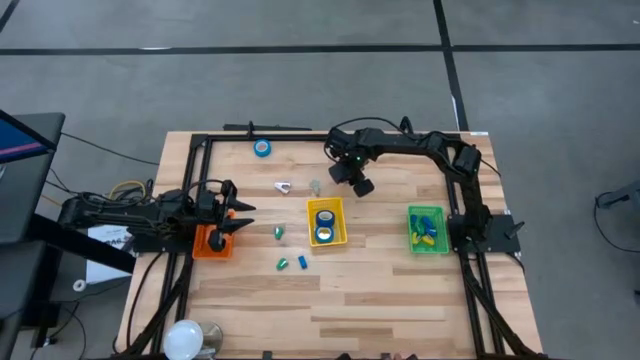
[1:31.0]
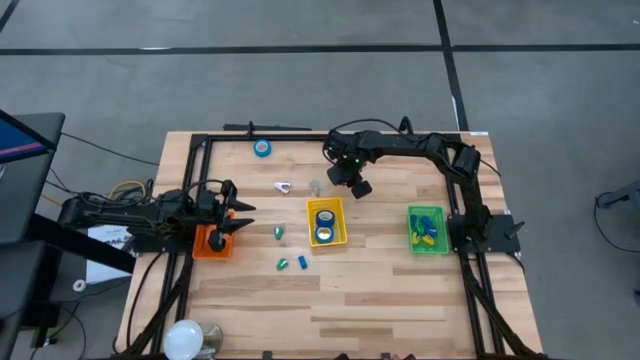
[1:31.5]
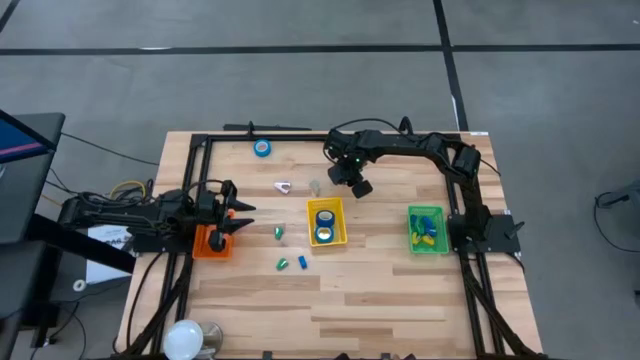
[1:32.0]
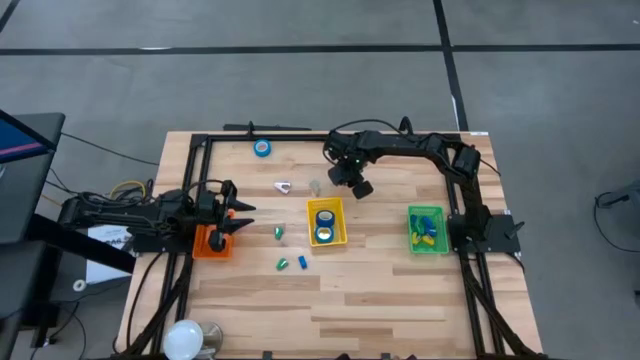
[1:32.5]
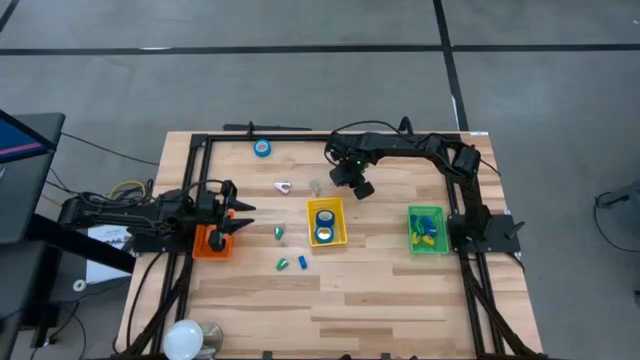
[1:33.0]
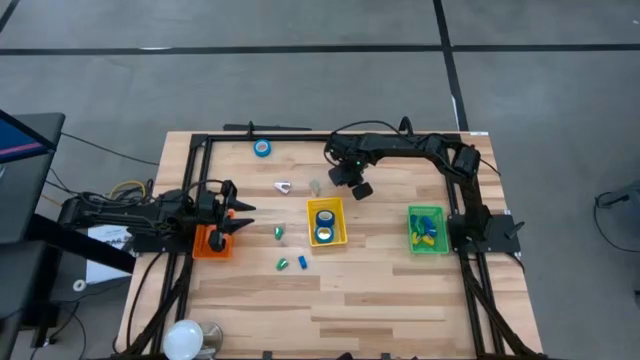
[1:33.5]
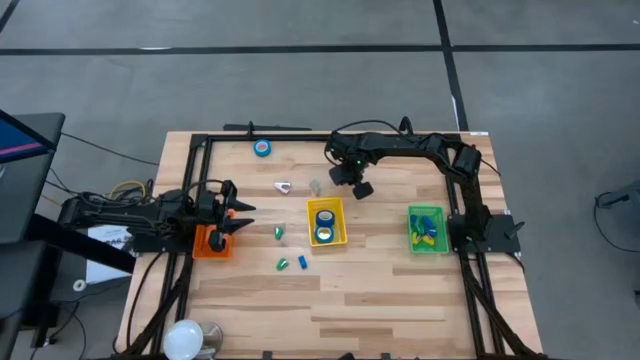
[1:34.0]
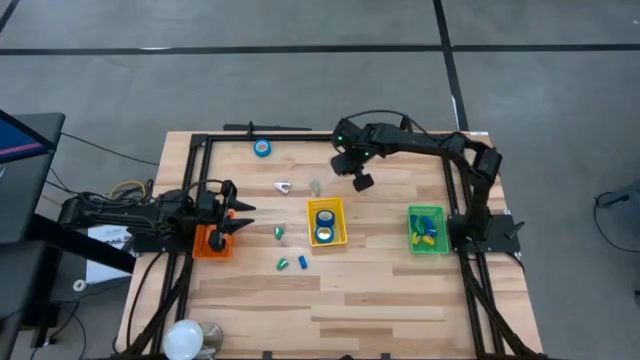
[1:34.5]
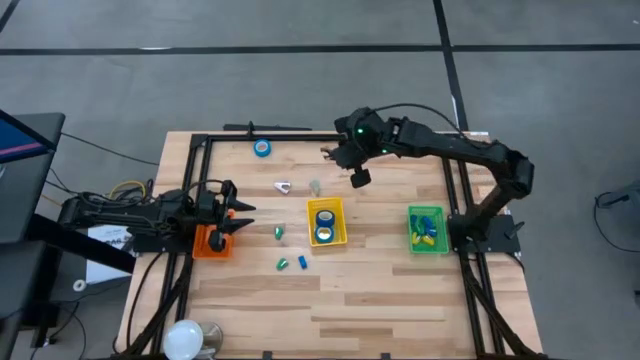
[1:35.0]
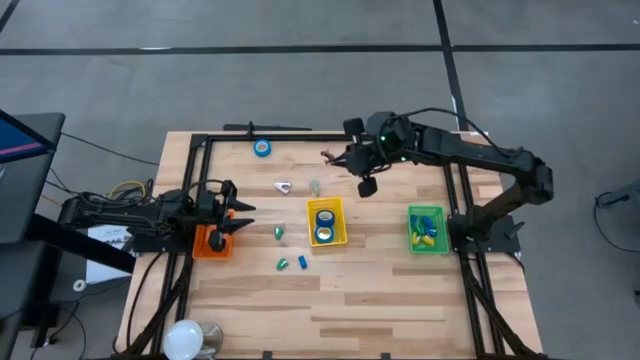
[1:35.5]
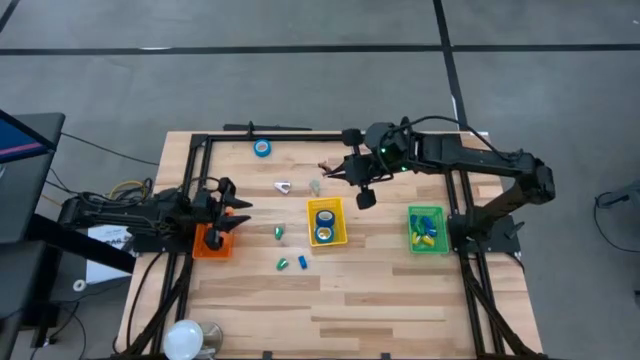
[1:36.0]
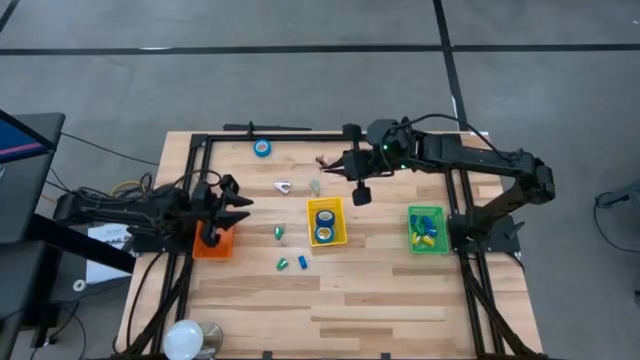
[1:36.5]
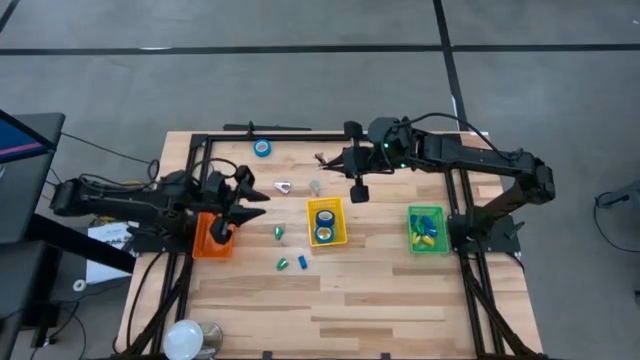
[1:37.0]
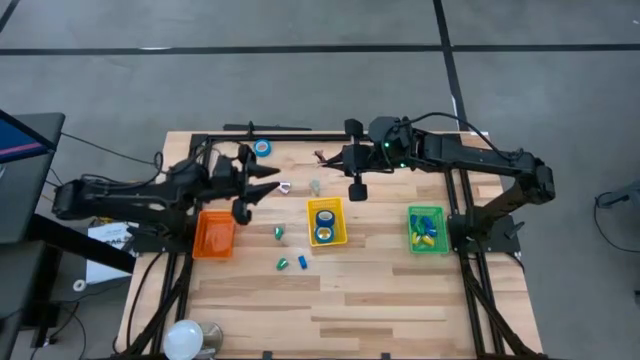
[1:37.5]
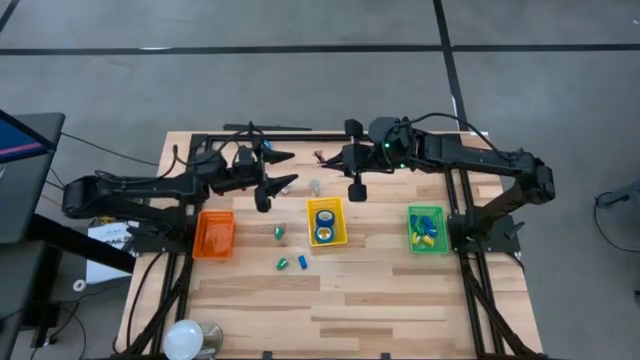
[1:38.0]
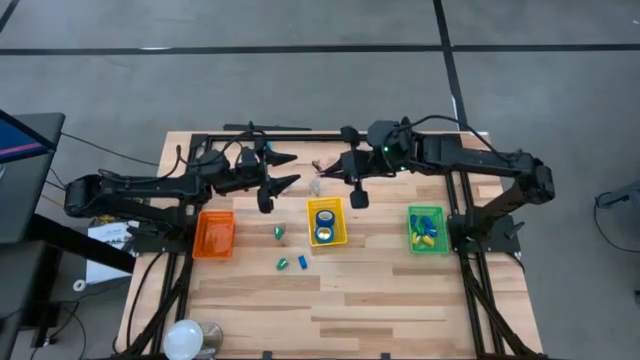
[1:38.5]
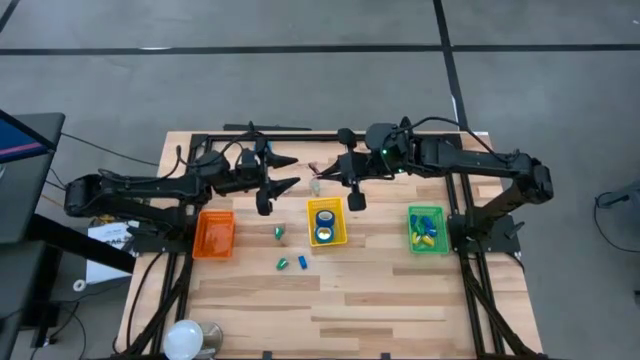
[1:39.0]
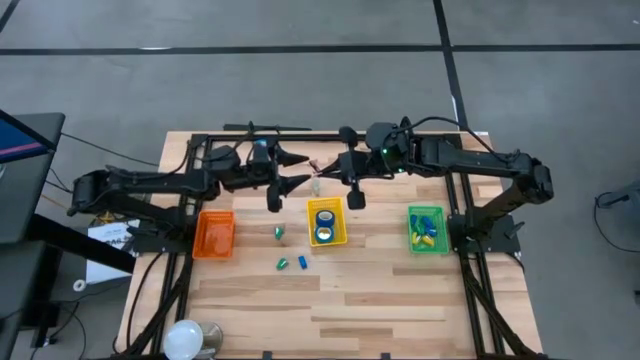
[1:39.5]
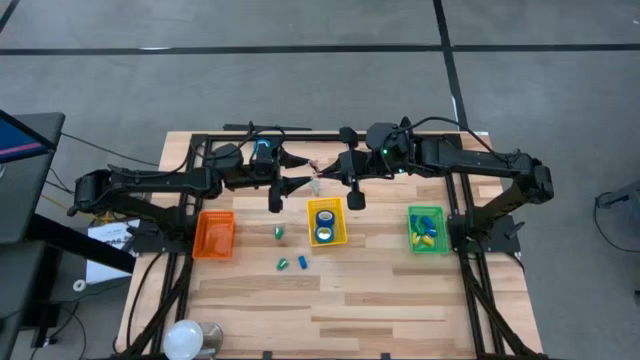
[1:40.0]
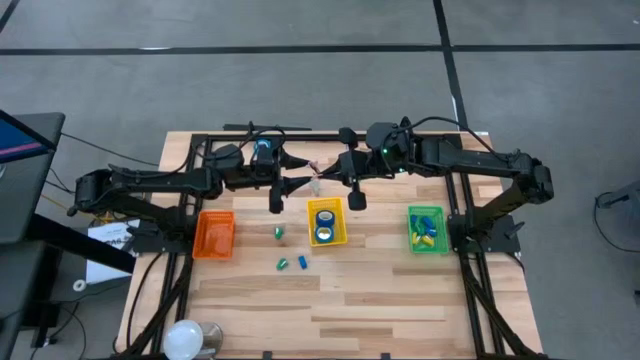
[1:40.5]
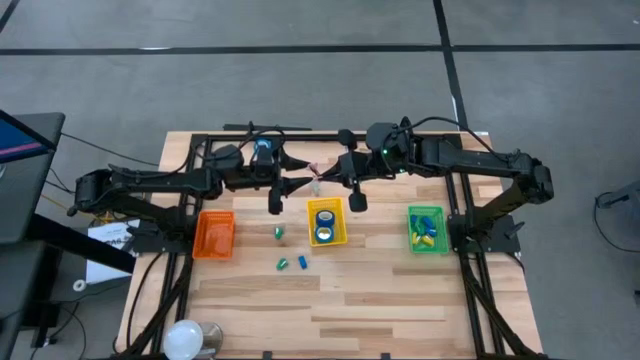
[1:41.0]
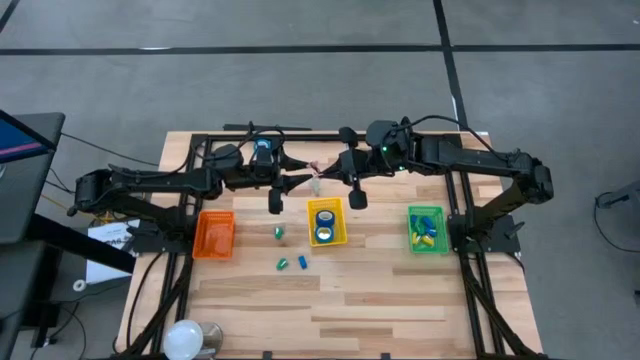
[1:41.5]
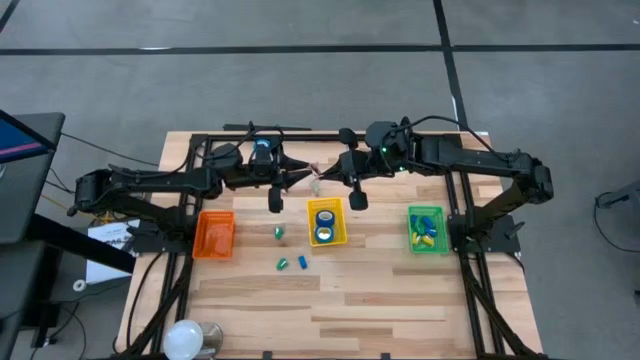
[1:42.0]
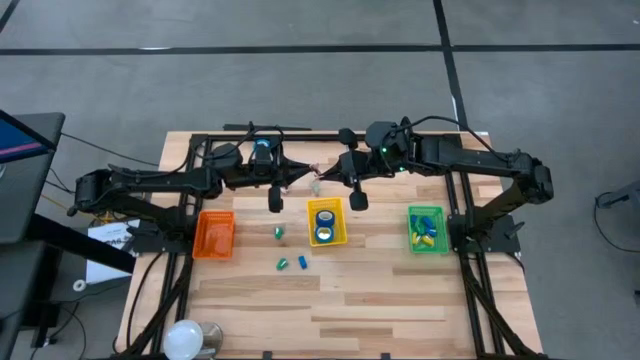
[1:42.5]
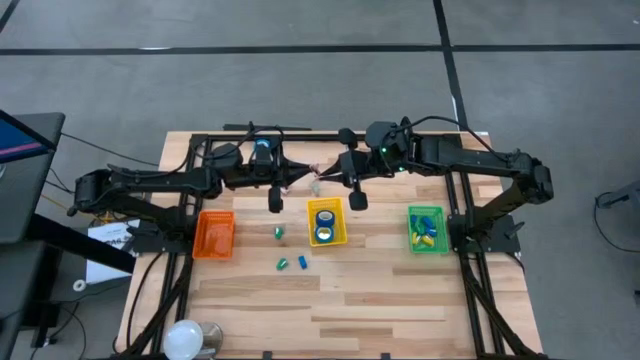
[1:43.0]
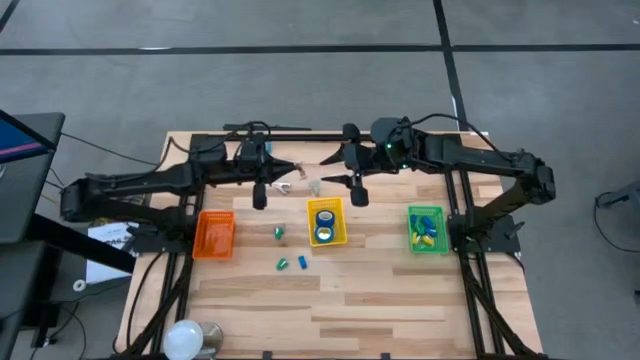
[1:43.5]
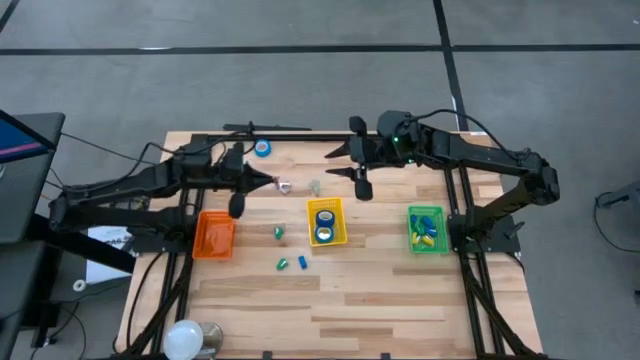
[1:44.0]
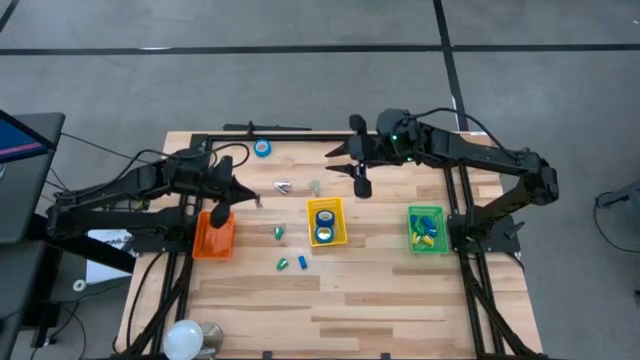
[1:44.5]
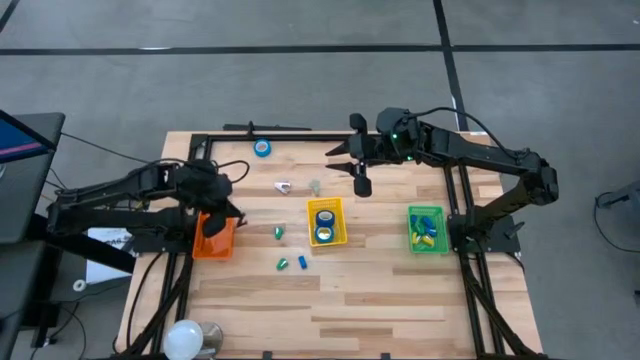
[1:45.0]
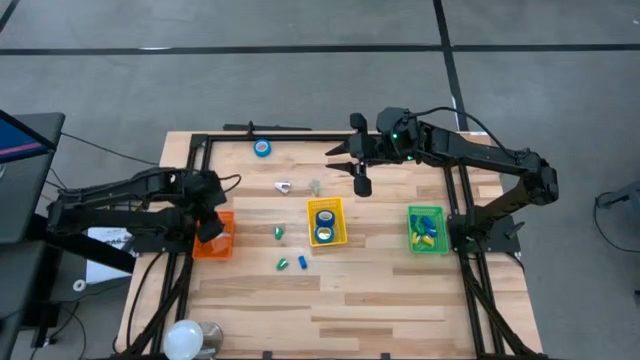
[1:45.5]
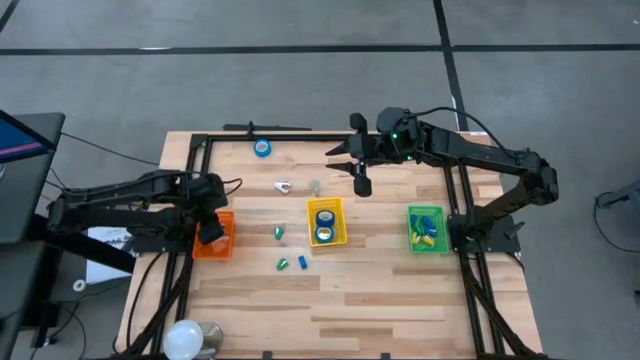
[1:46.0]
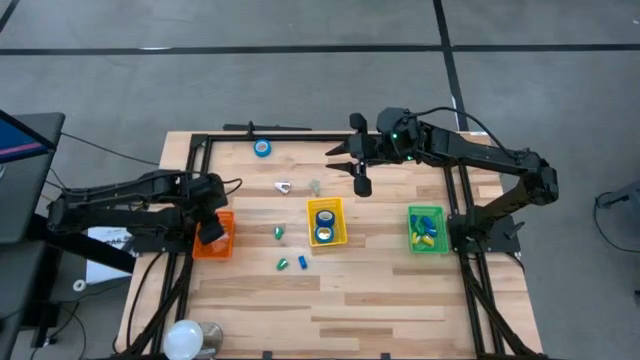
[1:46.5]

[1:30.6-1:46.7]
Task: Pick and place Stapler, Stapler remover, tape
Put the pink staple remover into the orange basket

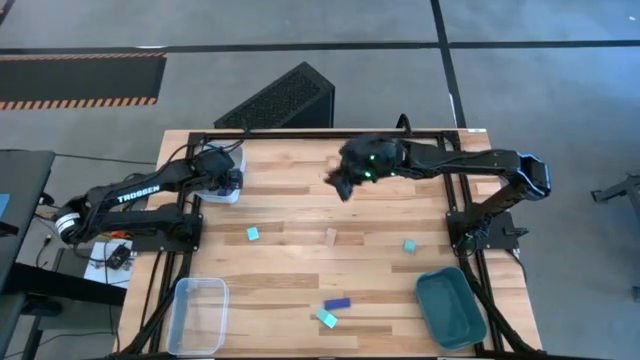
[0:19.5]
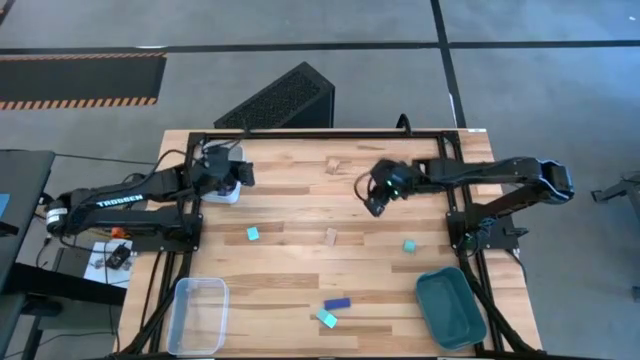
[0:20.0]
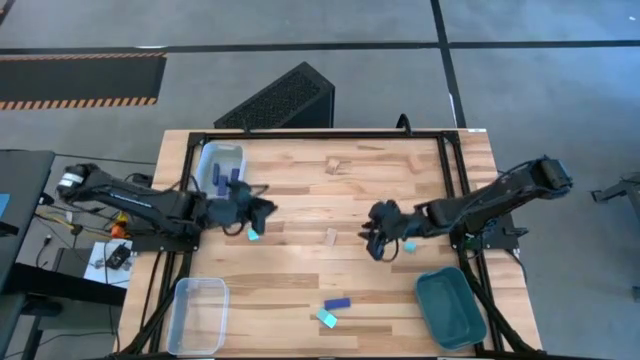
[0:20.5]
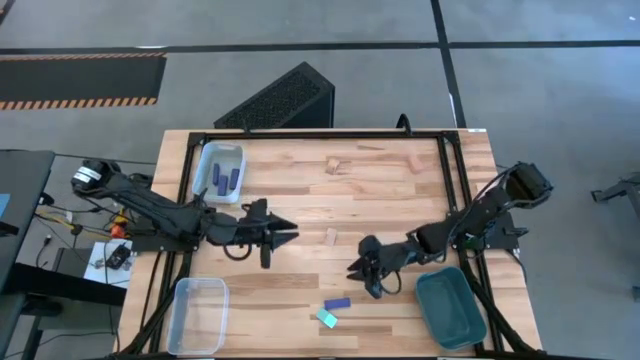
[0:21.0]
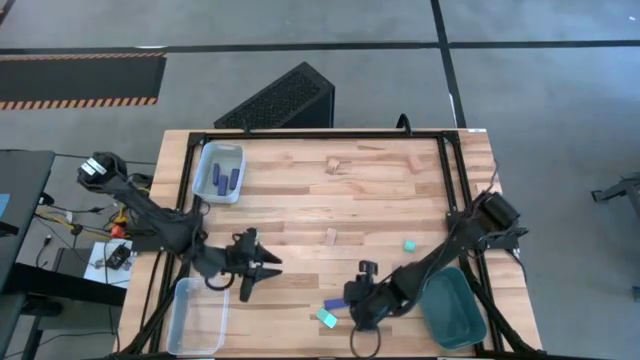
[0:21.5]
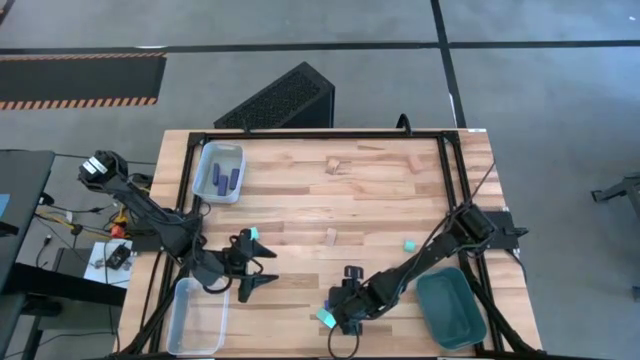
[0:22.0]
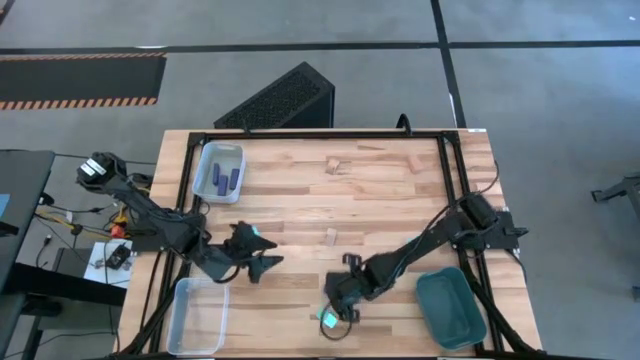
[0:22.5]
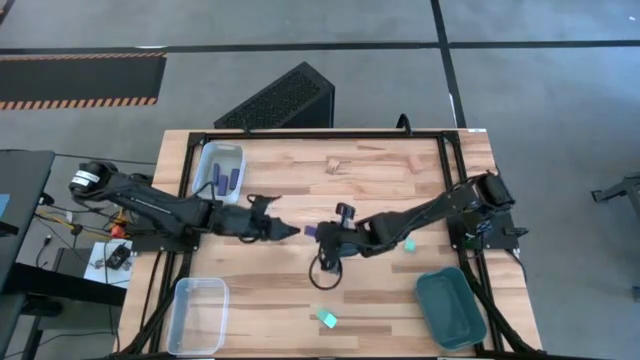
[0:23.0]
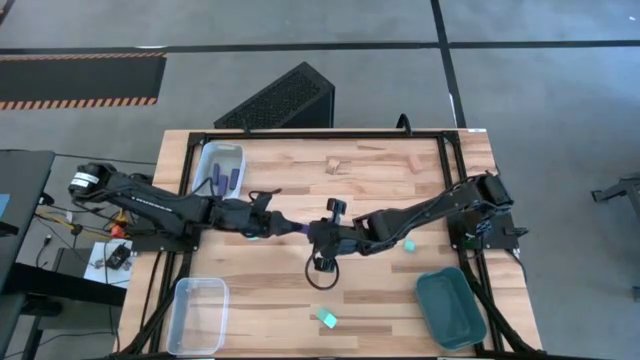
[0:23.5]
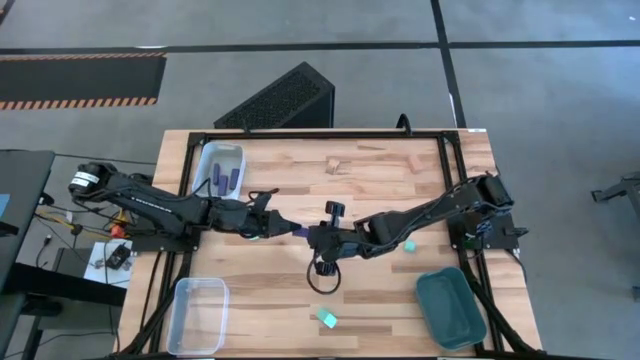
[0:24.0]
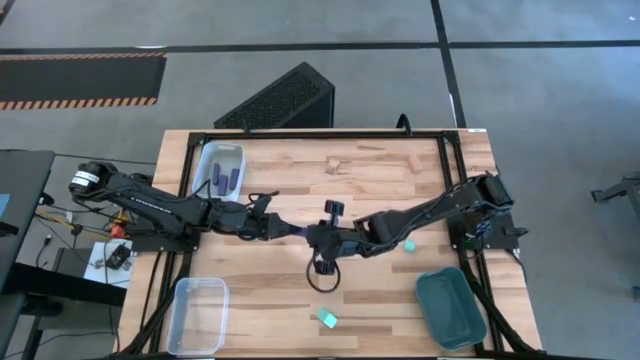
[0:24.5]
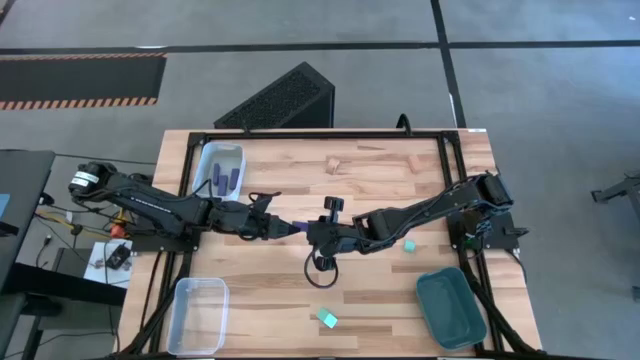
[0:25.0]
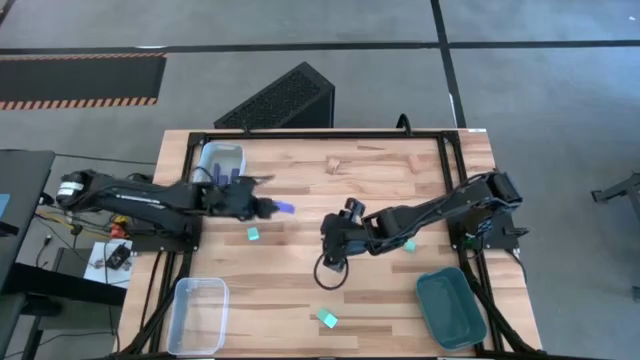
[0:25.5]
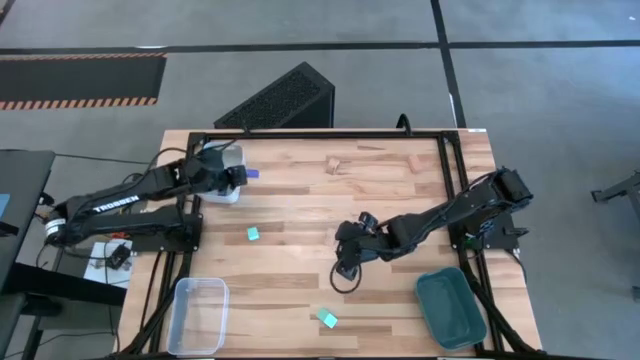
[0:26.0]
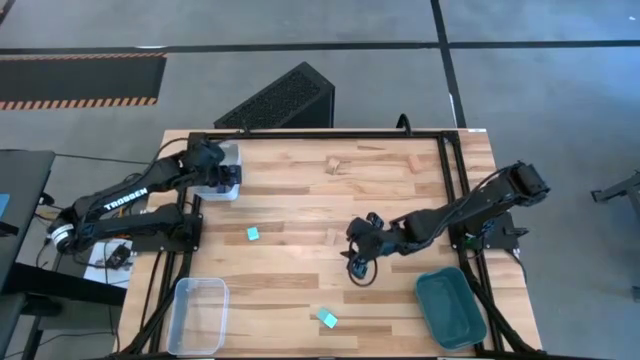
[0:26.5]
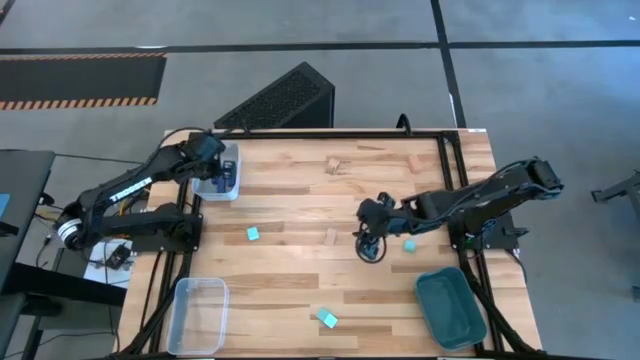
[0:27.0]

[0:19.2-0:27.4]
Task: Sort & place blocks by color
Put the violet block into the white bin
